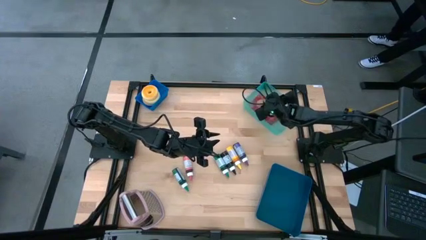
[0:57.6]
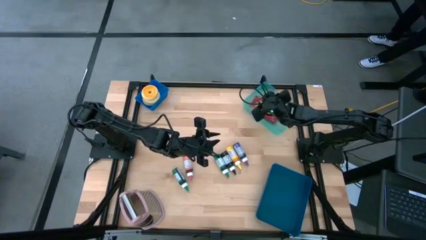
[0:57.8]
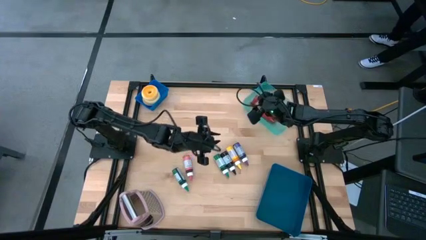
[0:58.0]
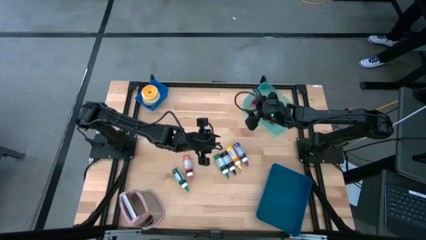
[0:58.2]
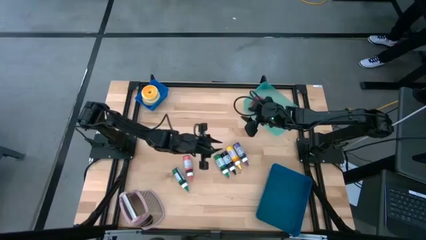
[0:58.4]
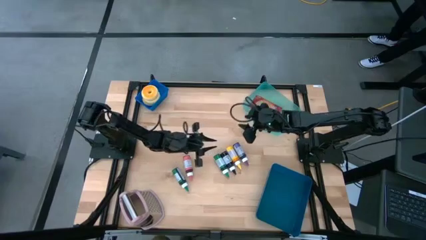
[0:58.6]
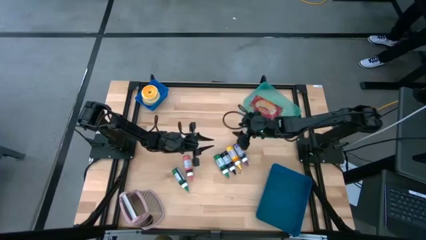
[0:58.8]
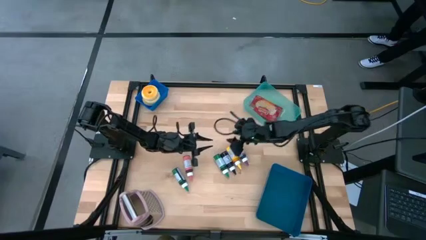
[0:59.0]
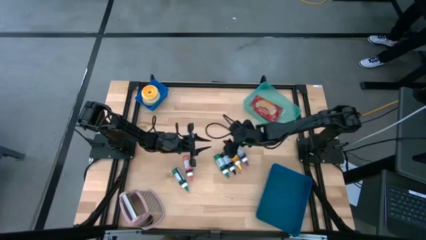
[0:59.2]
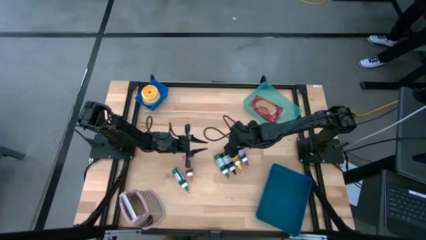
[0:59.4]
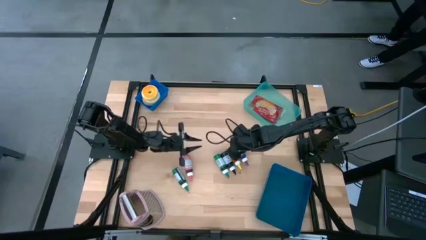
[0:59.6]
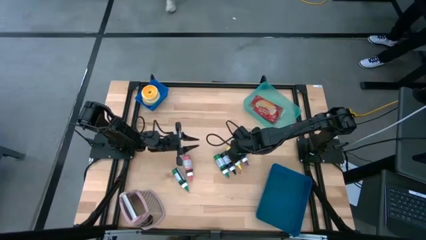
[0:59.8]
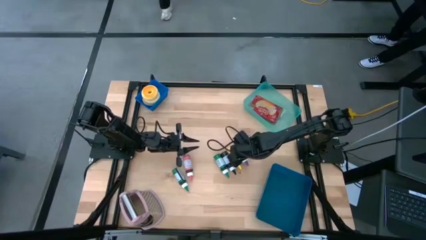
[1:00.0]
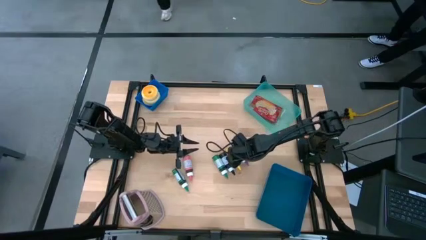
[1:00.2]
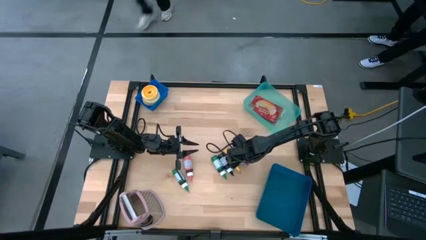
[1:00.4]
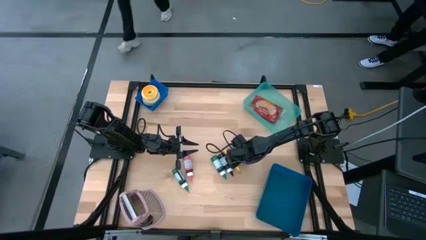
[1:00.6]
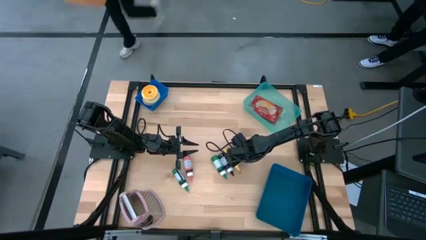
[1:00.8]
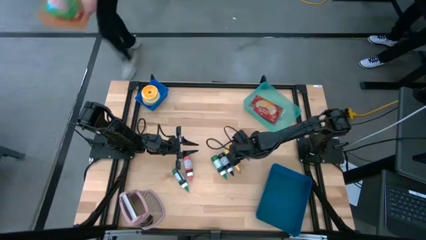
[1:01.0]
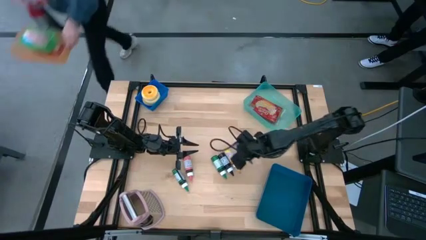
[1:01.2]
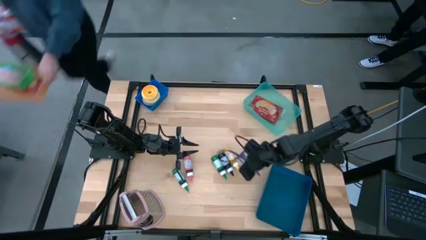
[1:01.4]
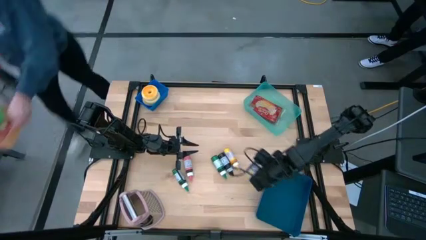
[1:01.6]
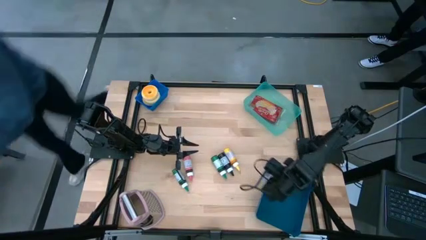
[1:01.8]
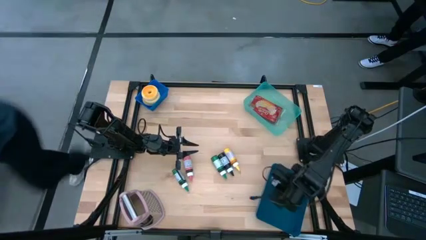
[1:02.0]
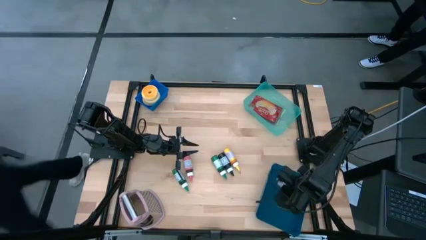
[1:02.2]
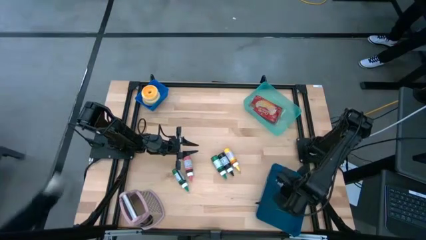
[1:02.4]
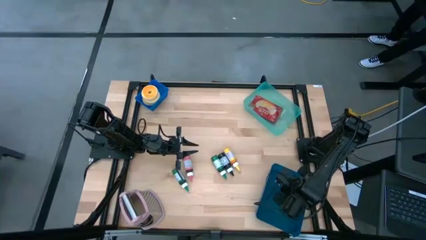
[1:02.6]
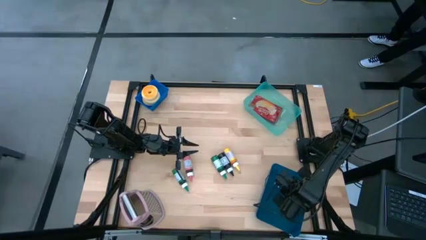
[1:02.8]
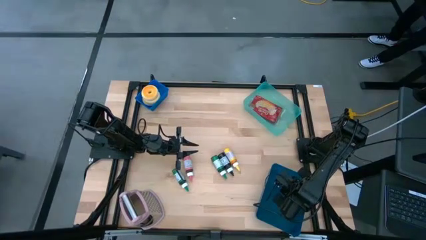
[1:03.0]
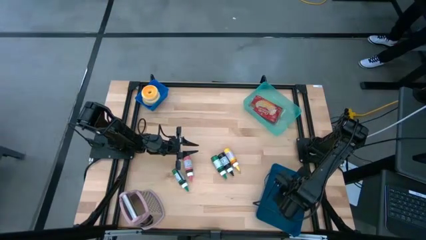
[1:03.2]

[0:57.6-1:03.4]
Put the purple food coloring bottle into the bottom blue bin

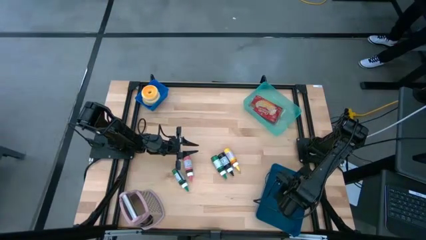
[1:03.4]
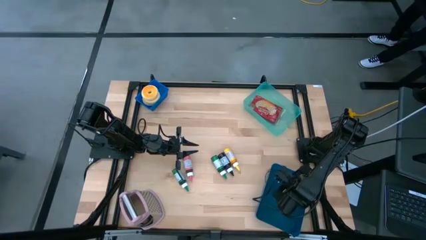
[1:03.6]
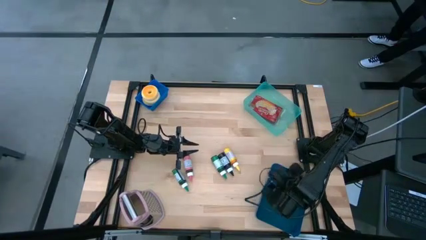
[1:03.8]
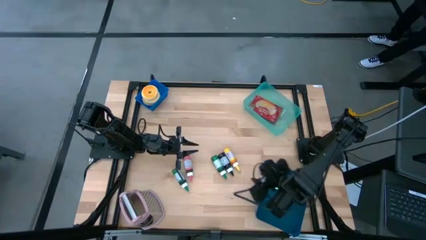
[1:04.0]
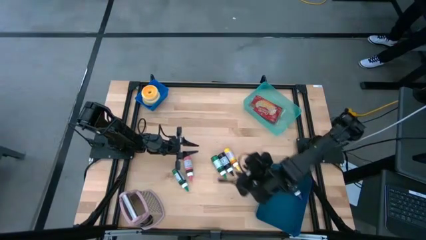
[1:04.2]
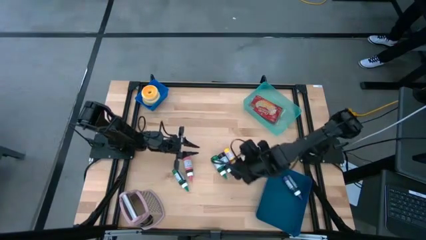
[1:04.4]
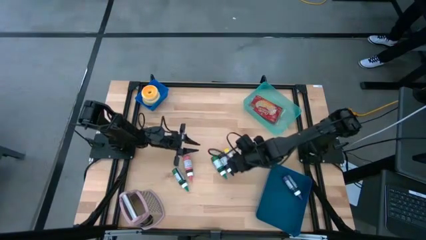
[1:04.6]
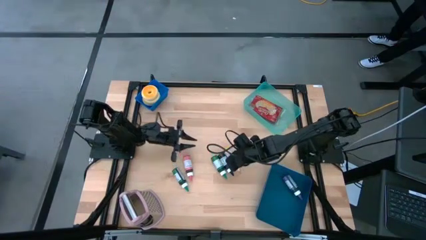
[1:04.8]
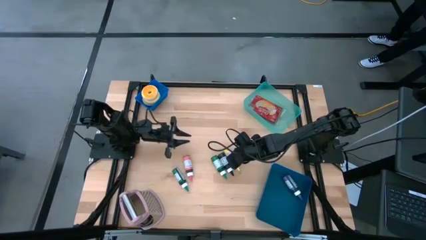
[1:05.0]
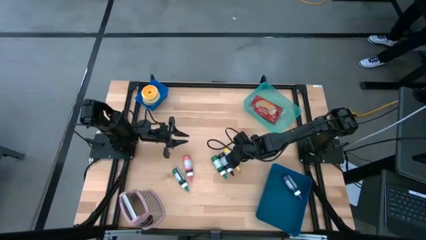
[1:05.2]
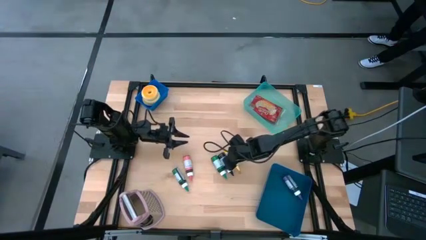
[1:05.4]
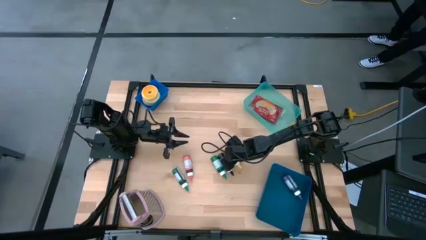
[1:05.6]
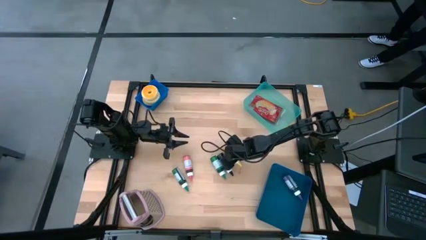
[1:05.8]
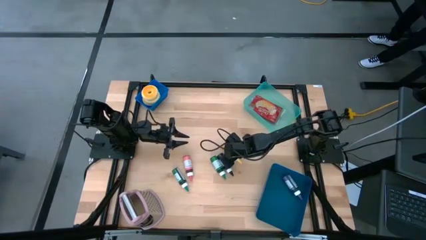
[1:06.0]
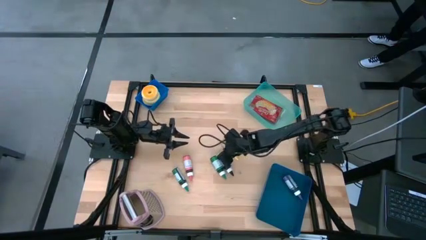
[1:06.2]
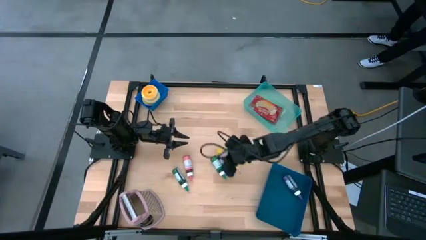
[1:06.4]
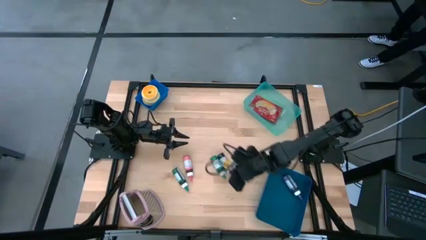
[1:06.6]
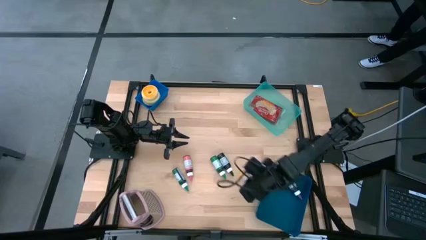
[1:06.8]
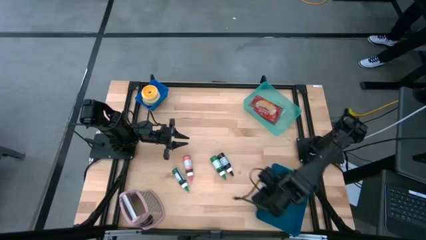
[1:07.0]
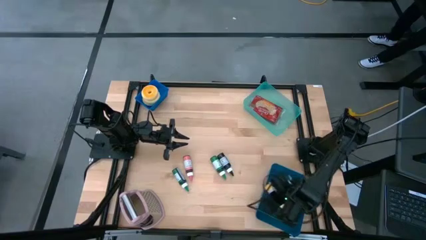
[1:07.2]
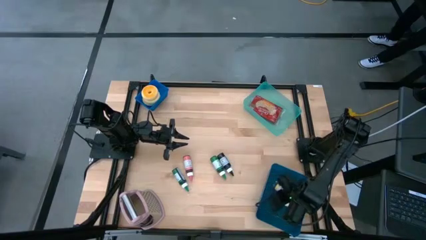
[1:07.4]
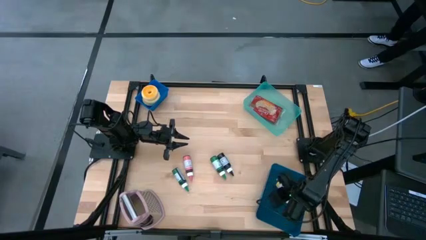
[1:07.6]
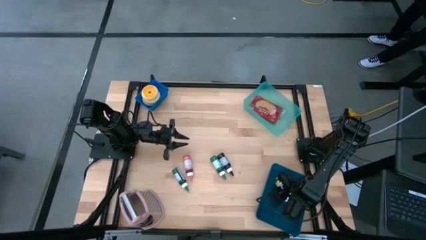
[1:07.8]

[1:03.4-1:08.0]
Put the yellow food coloring bottle into the bottom blue bin

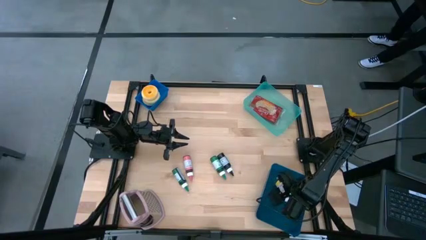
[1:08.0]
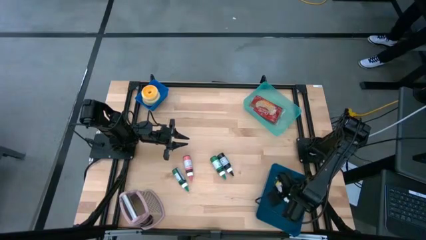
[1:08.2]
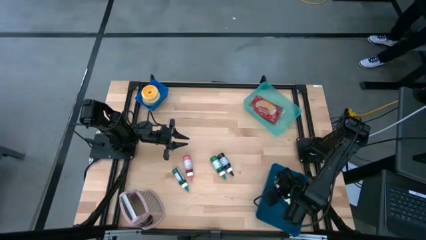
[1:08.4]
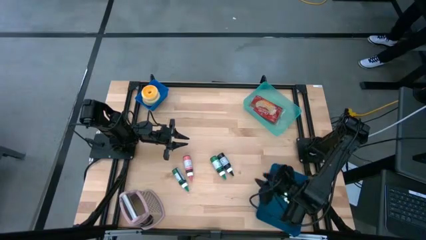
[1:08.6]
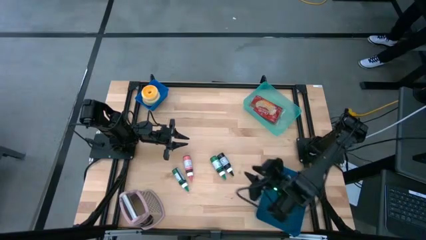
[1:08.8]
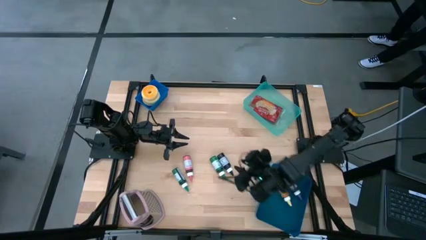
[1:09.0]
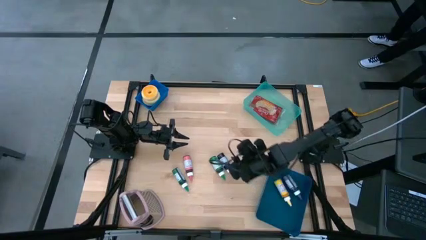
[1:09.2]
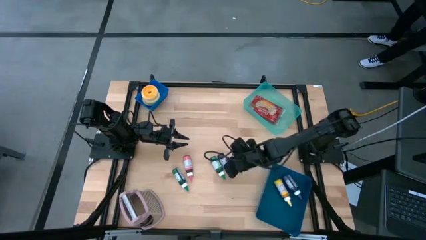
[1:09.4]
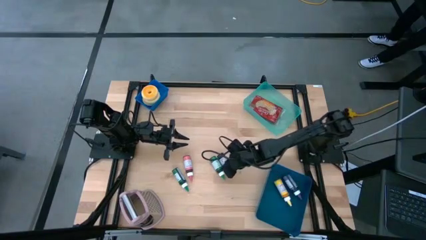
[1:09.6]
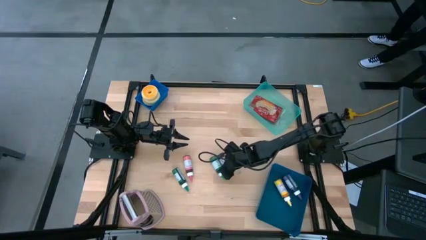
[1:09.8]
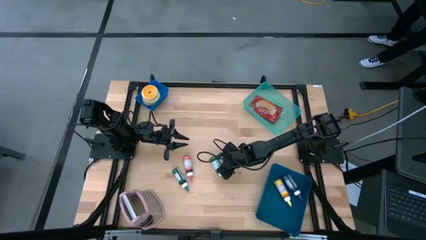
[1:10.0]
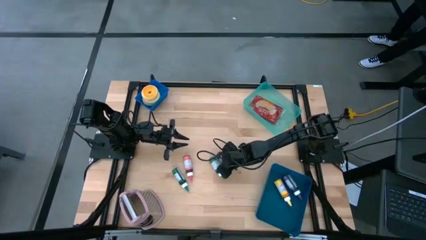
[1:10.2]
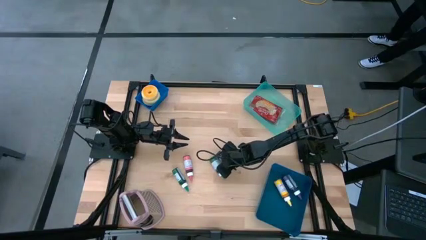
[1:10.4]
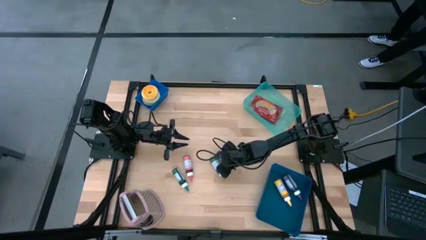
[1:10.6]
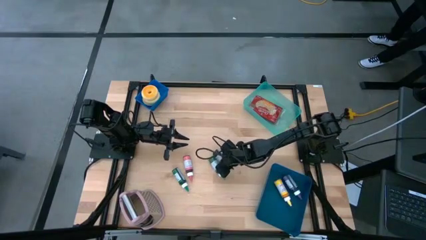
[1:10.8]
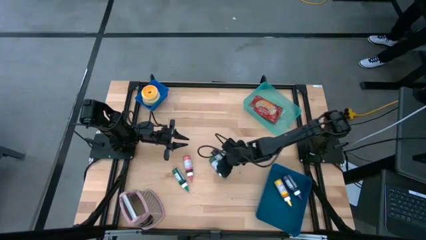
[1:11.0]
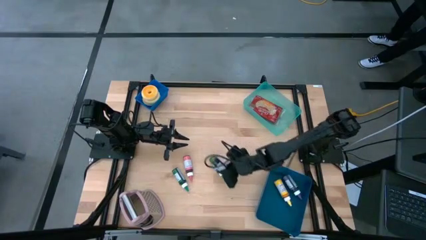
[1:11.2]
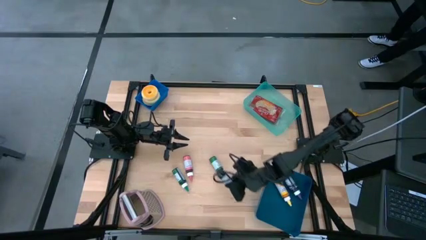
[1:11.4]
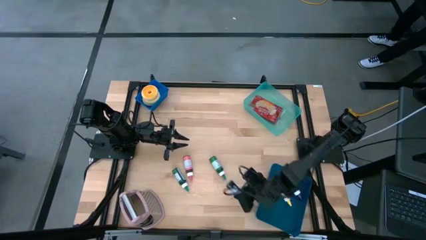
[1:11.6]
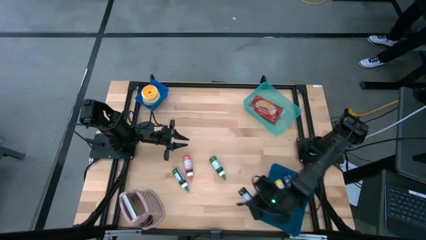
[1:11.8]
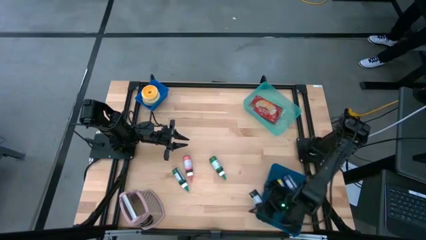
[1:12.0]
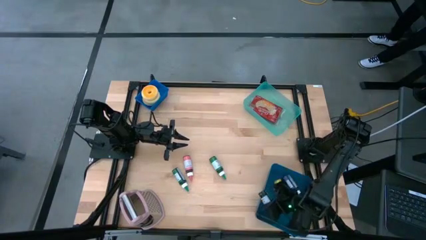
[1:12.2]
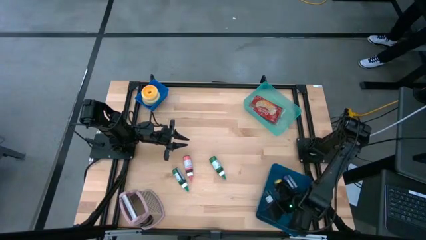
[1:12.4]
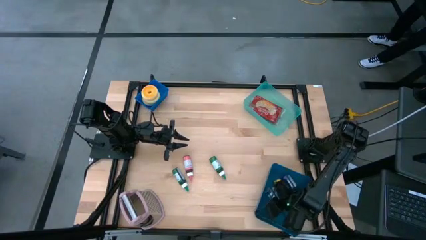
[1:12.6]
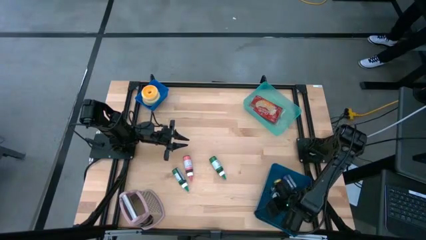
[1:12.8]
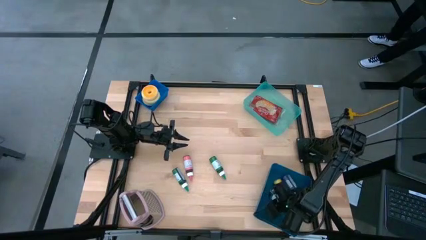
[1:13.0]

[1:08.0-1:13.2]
Put the black food coloring bottle into the bottom blue bin
